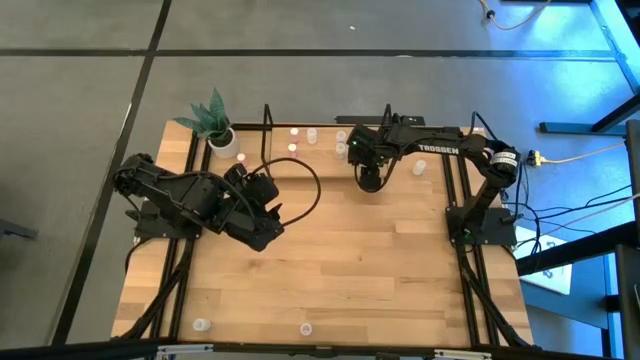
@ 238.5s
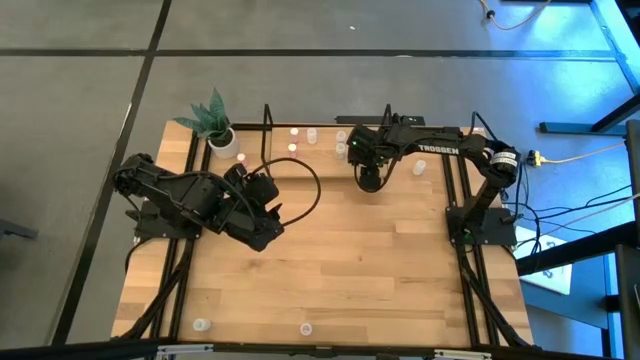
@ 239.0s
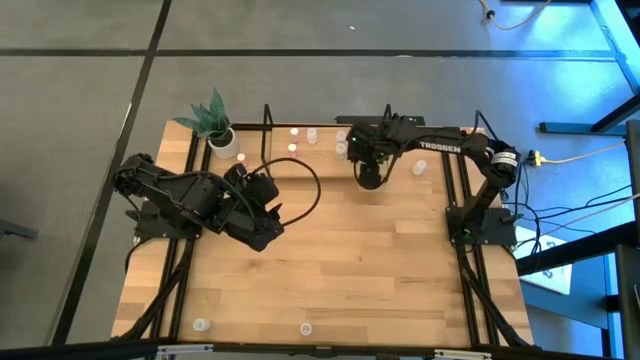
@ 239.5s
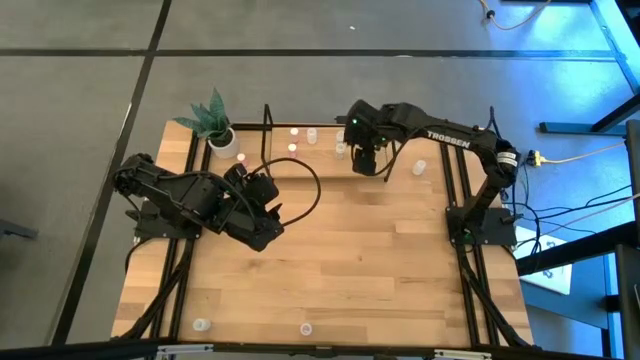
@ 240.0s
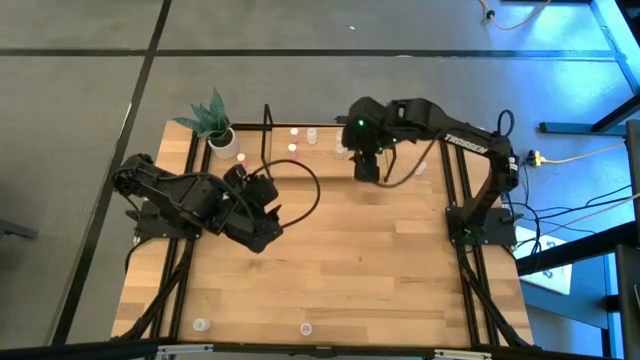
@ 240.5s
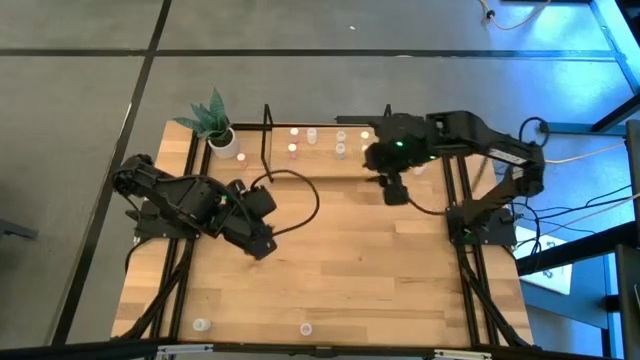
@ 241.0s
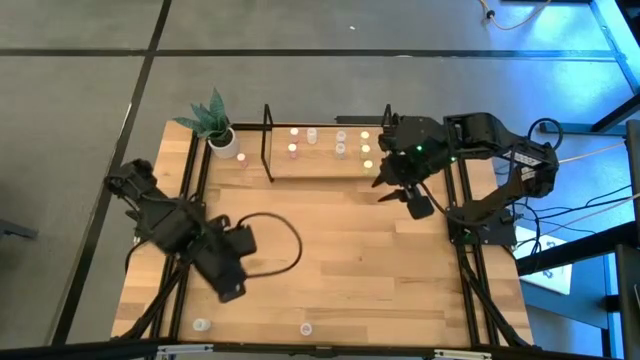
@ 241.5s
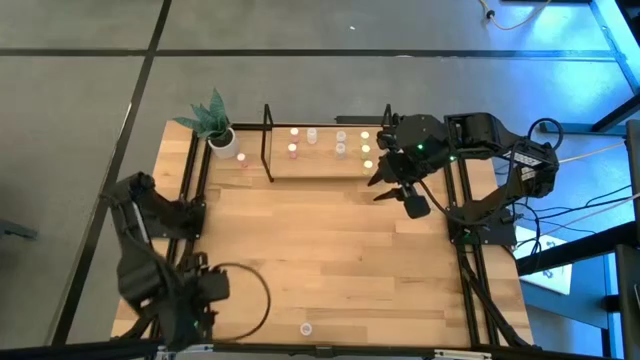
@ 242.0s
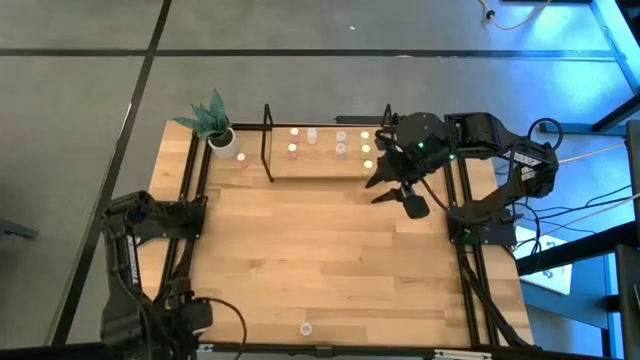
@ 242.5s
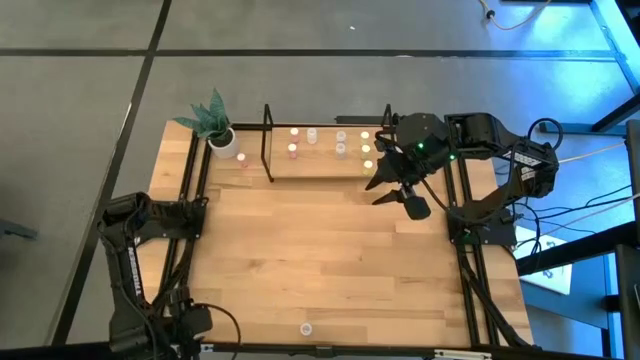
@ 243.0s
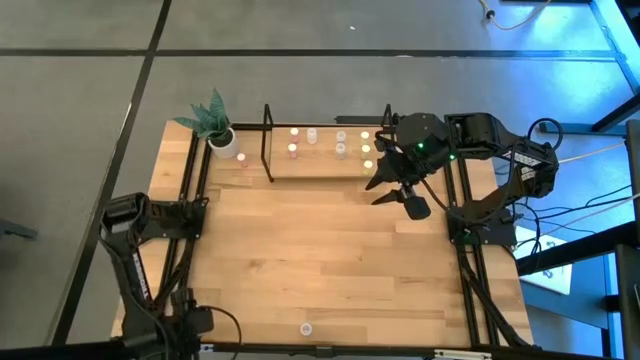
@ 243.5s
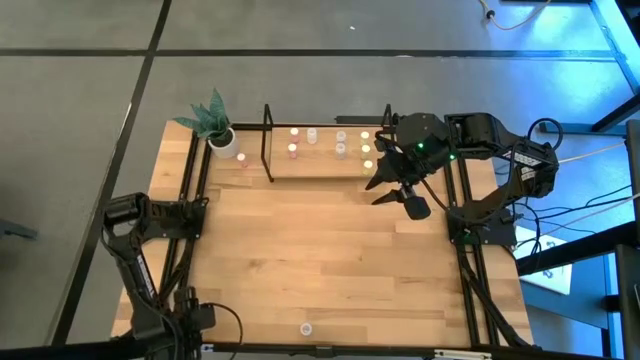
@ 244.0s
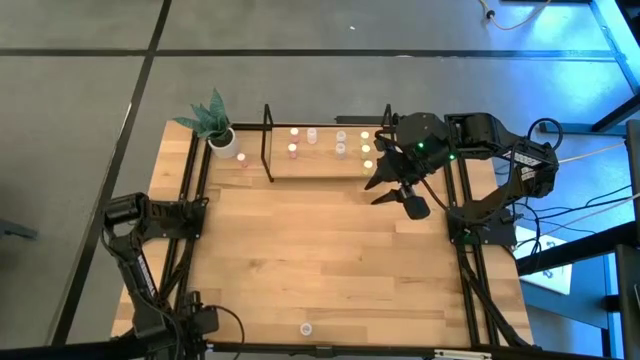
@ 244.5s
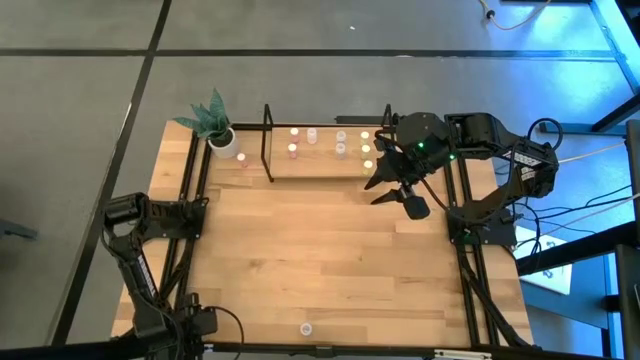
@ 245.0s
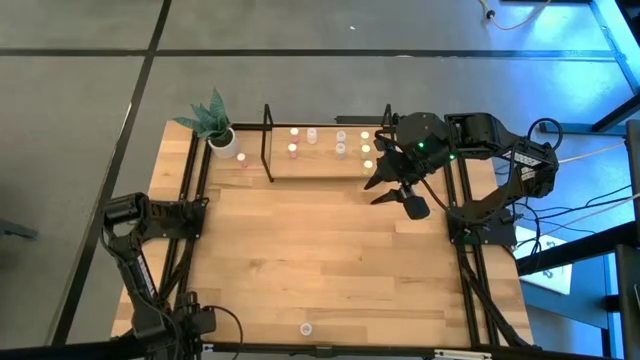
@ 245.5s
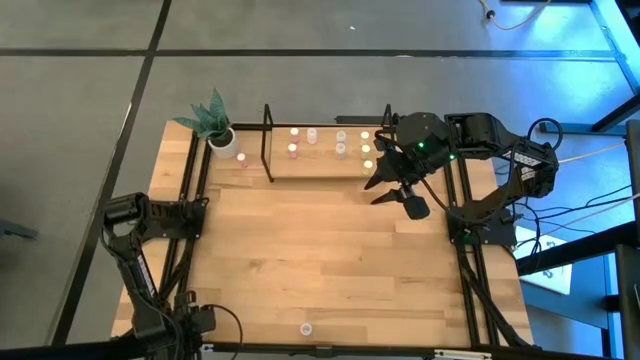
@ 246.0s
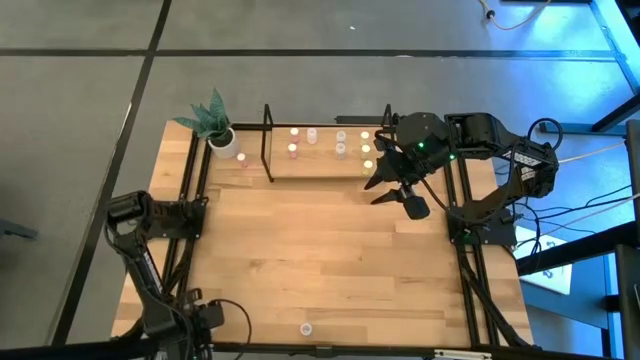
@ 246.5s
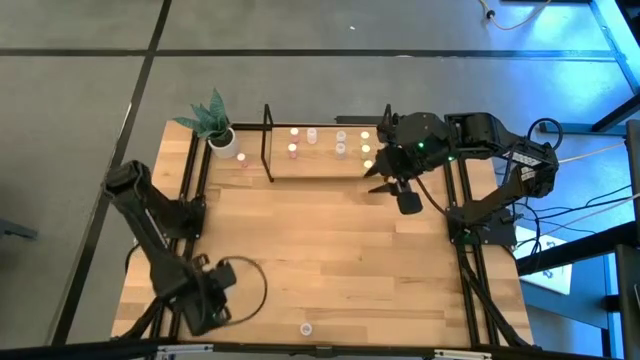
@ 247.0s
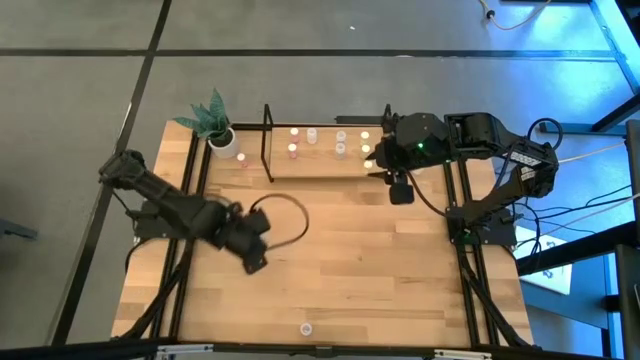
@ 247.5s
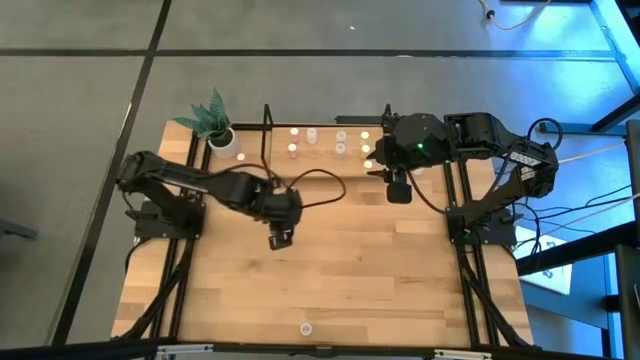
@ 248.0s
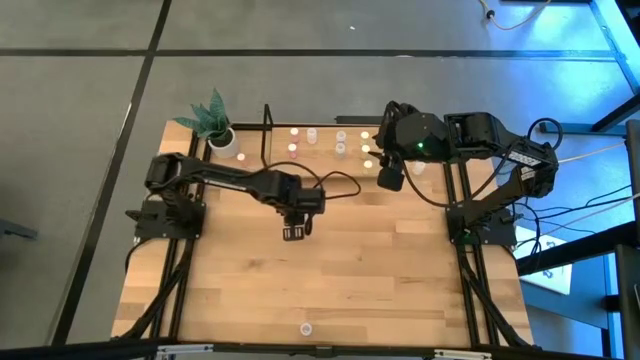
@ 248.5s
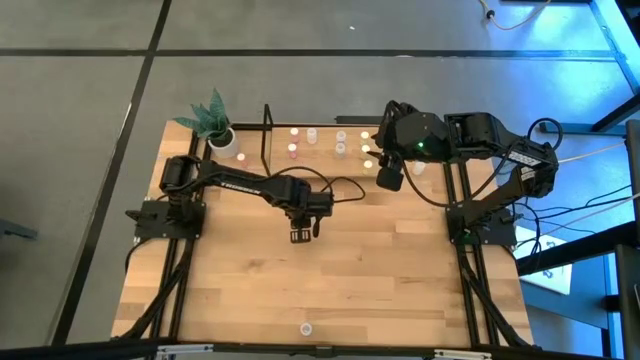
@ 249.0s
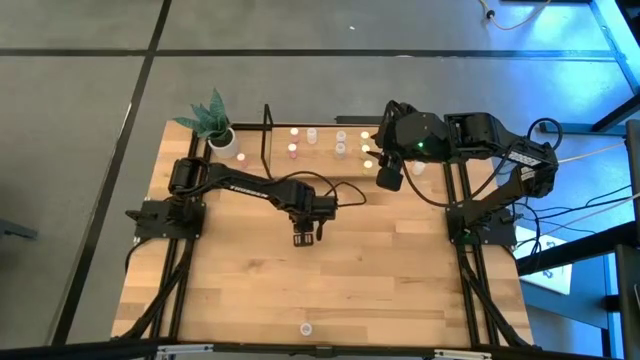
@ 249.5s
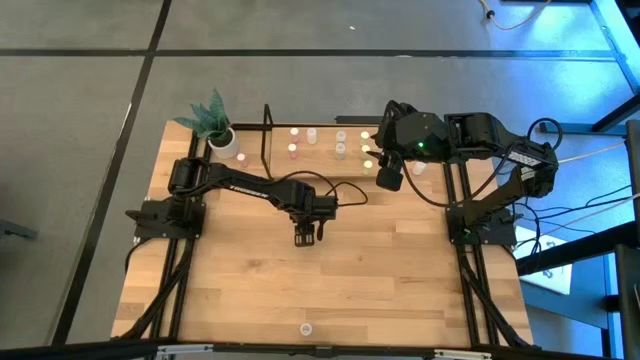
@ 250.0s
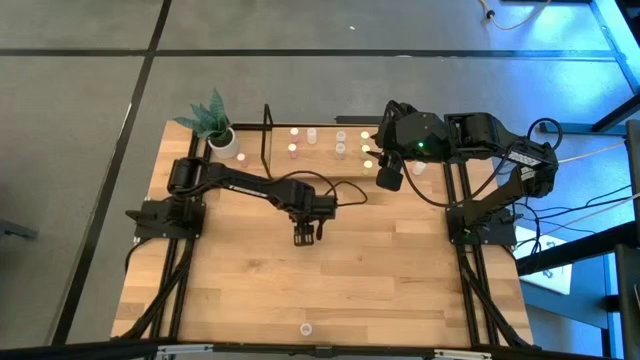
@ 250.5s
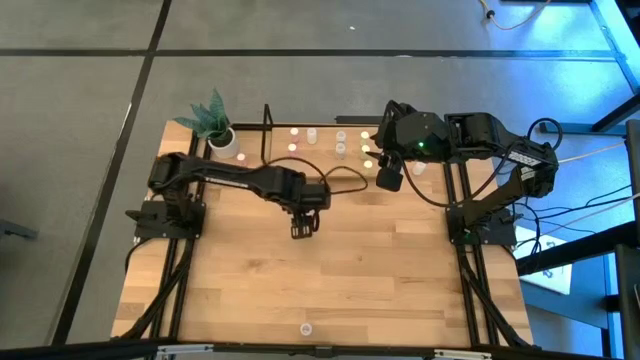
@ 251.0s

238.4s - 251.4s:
Task: Pick and place medicine bottles onto shelf by color
Put the bottom white pill bottle on the shelf aligned with the other white pill bottle

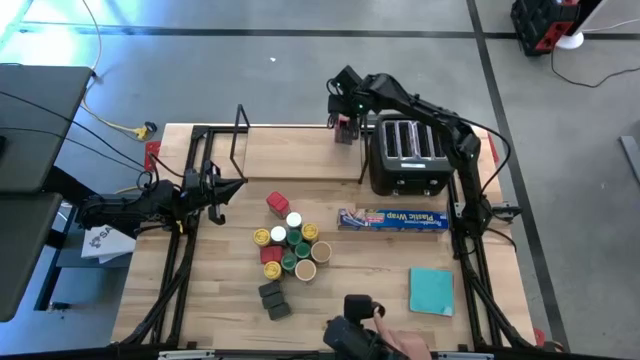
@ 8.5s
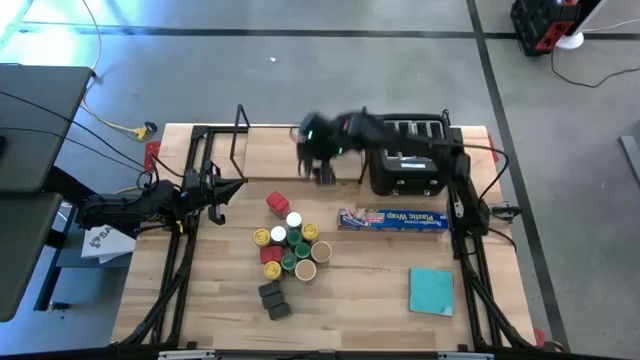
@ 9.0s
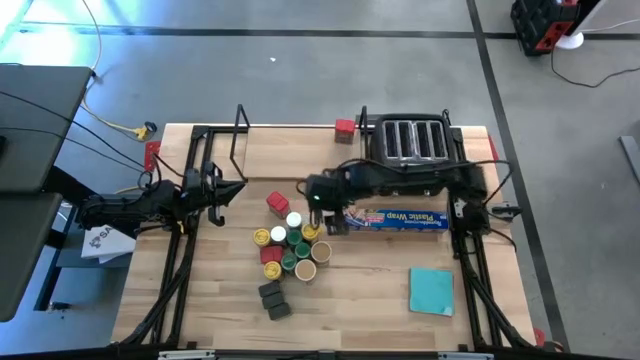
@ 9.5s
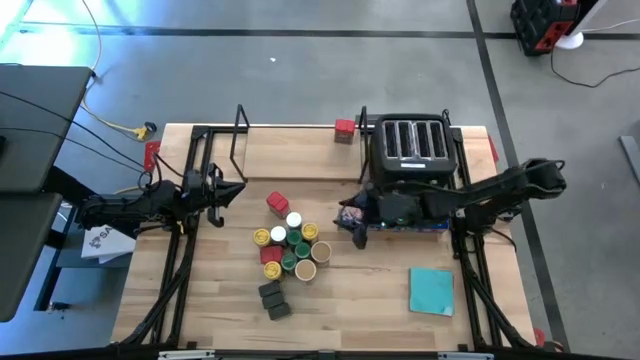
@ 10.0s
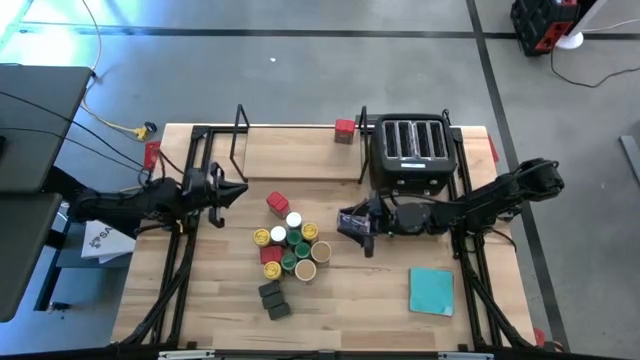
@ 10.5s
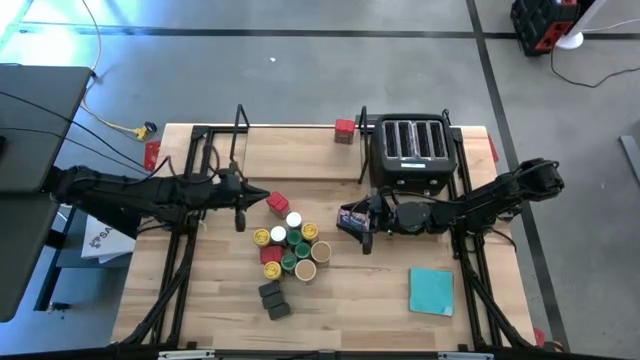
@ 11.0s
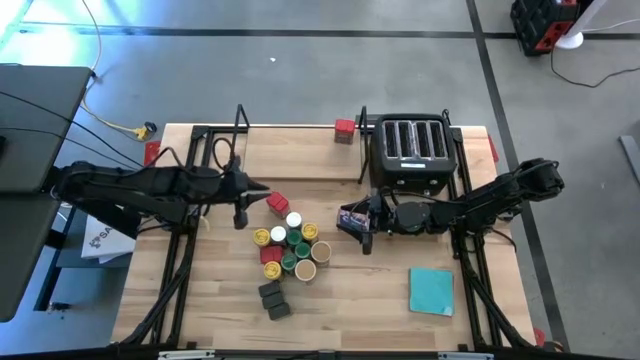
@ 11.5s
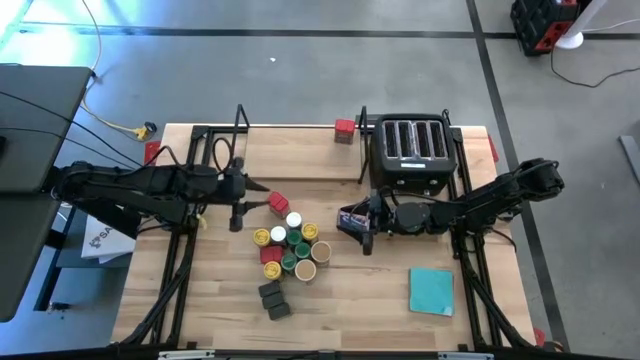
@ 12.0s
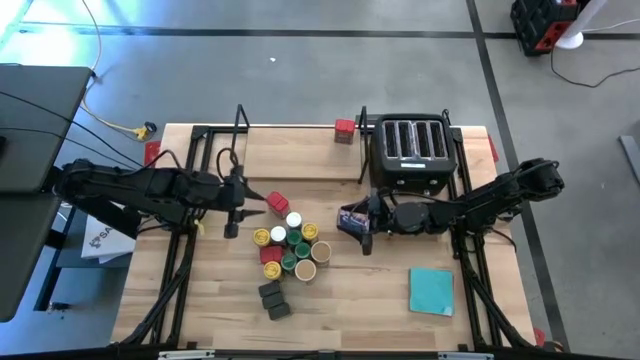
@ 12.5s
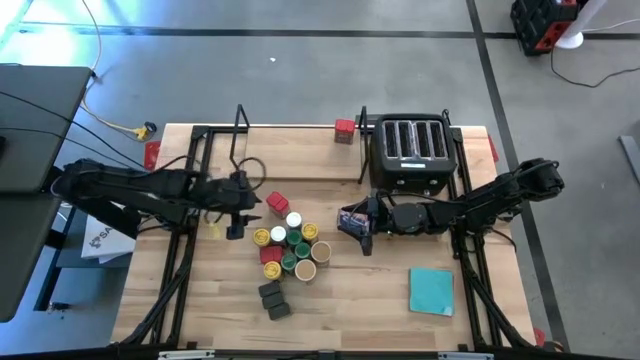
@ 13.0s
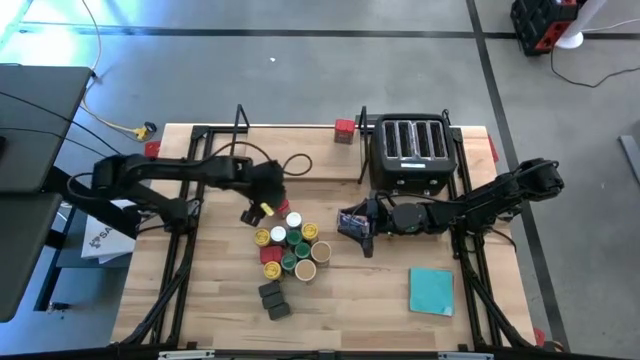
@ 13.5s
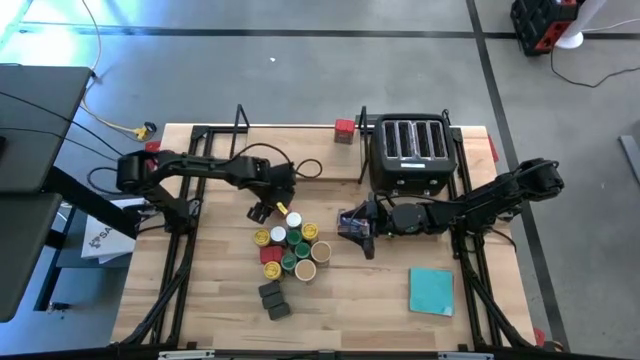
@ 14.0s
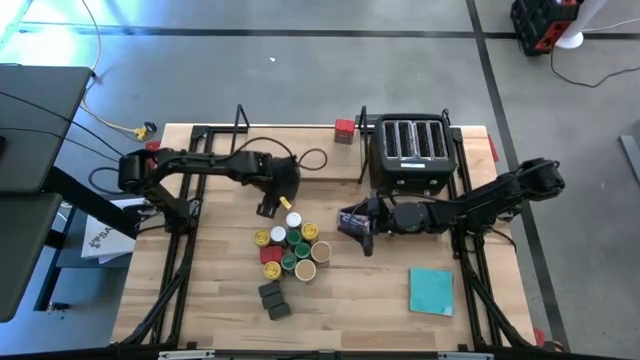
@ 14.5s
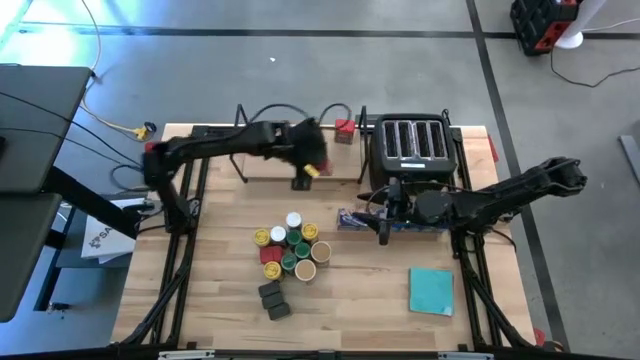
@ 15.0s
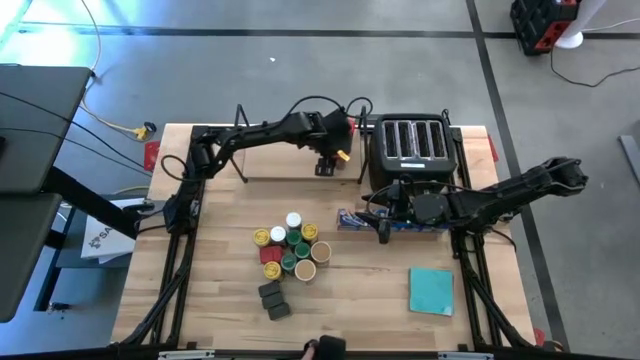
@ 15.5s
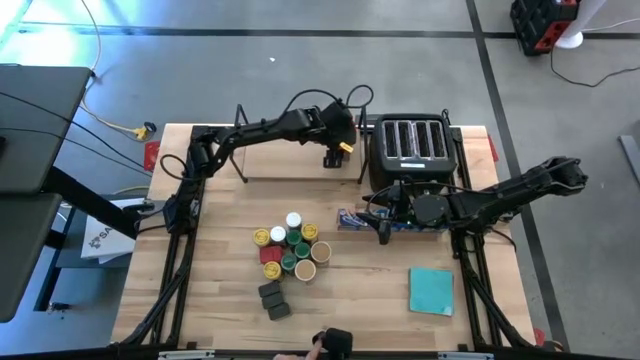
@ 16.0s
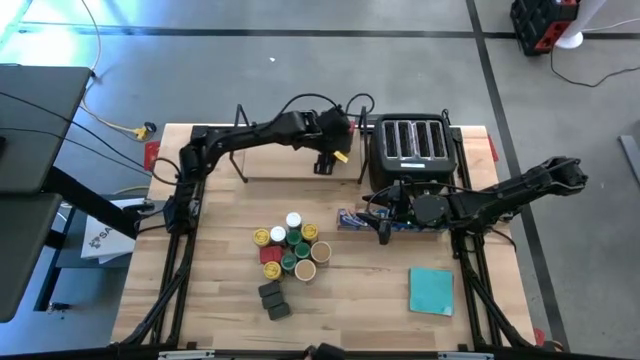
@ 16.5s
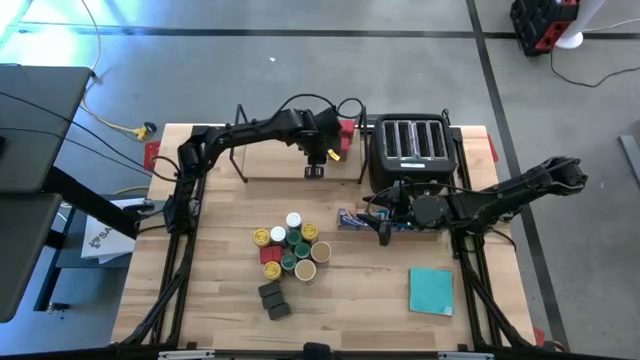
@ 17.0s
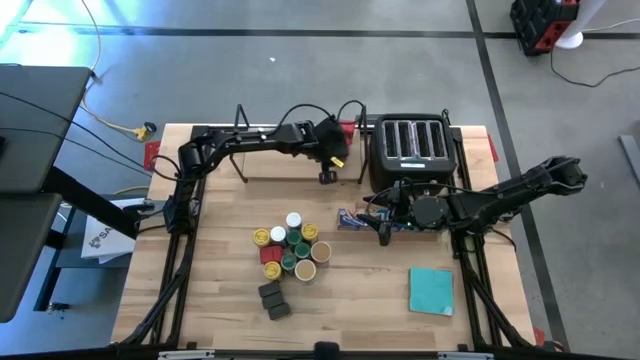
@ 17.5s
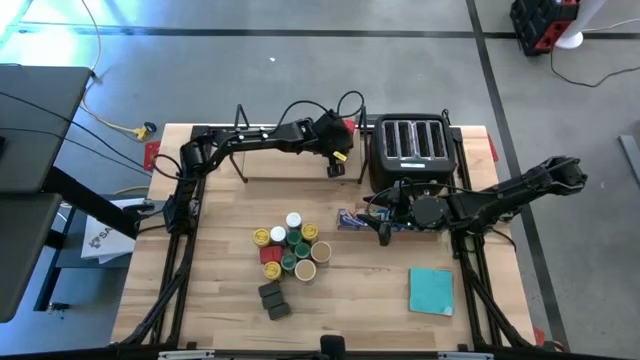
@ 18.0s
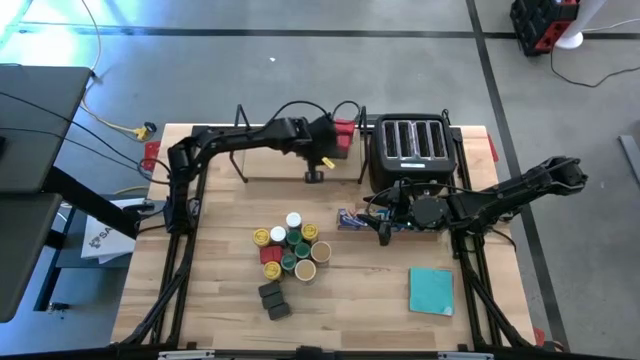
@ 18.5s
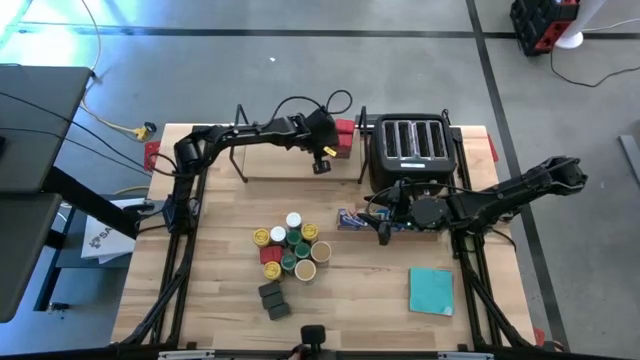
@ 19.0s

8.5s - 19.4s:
Task: Shelf spices
Put the top red seasoning can on the shelf aligned with the other red seasoning can
